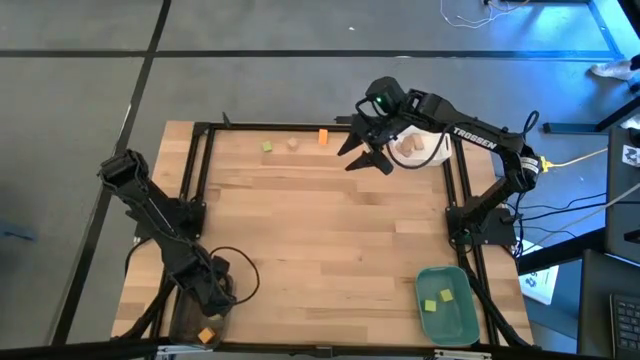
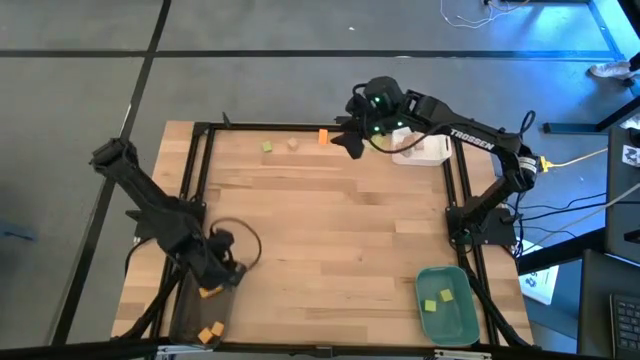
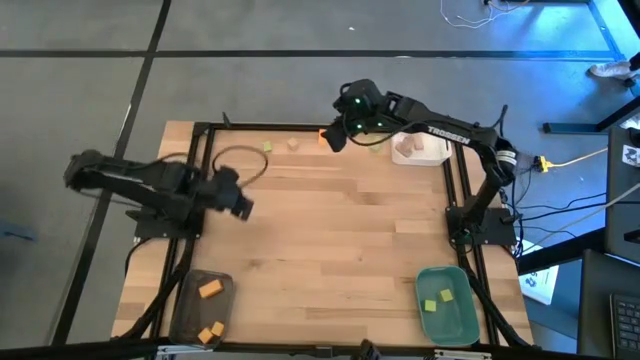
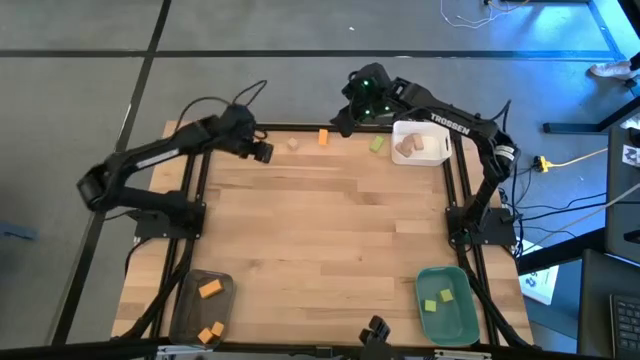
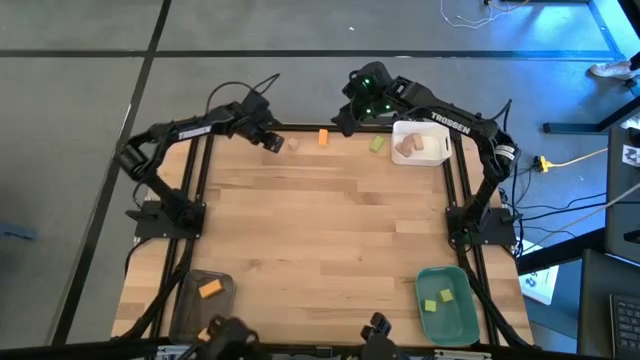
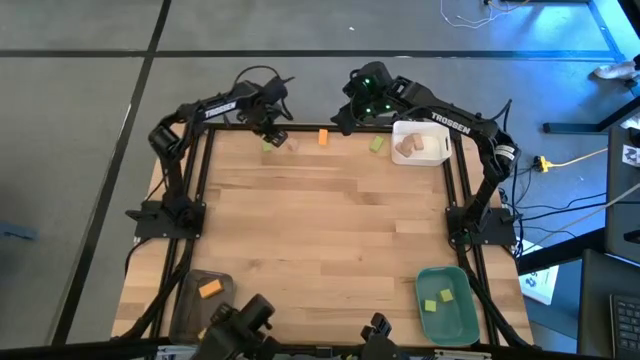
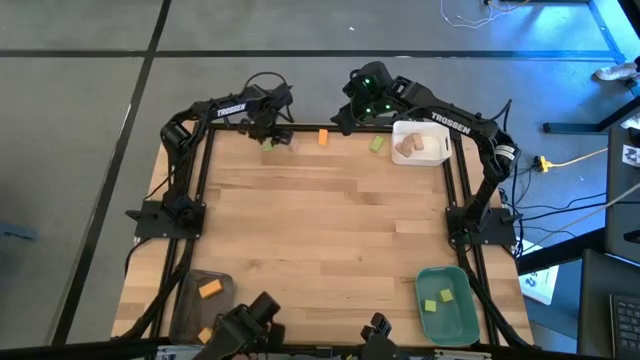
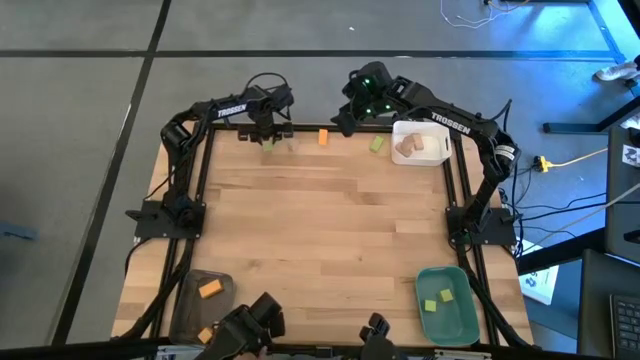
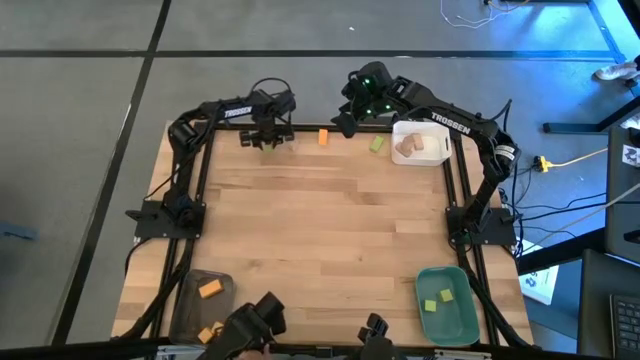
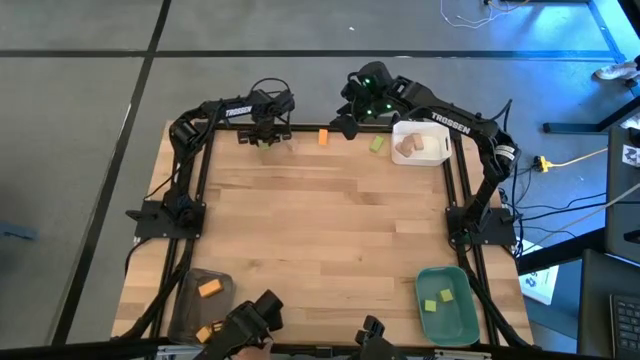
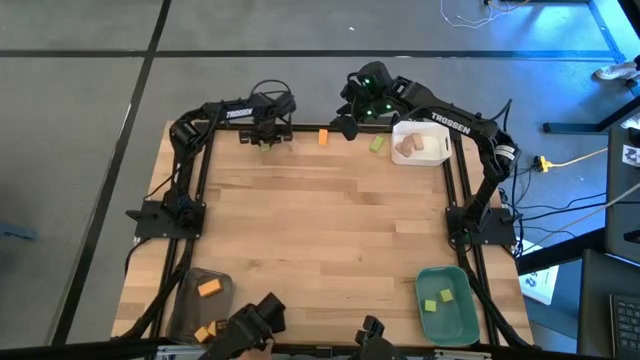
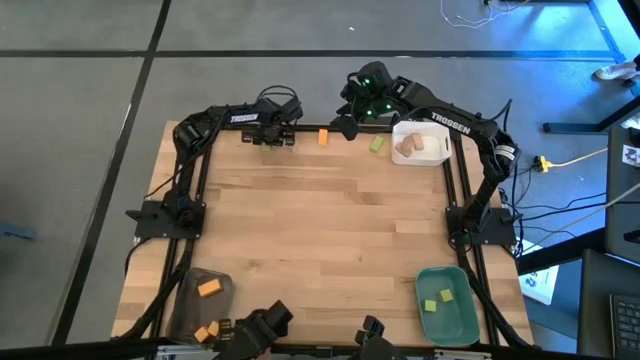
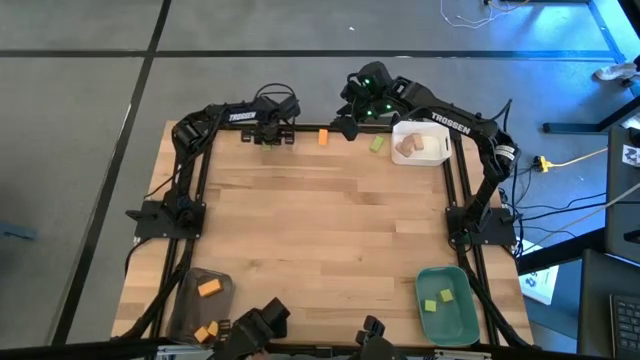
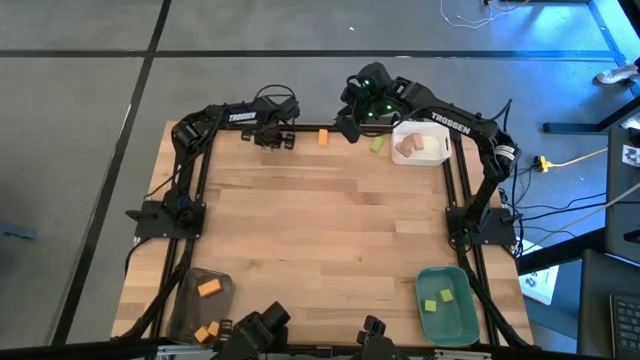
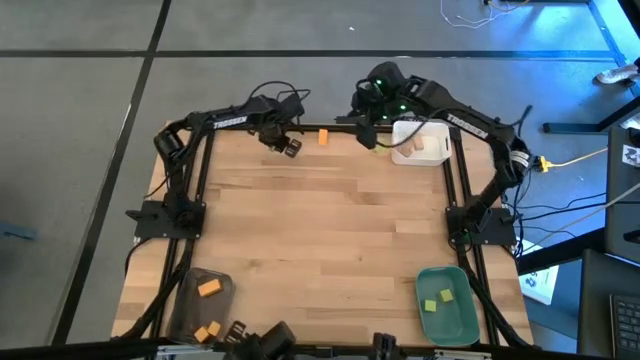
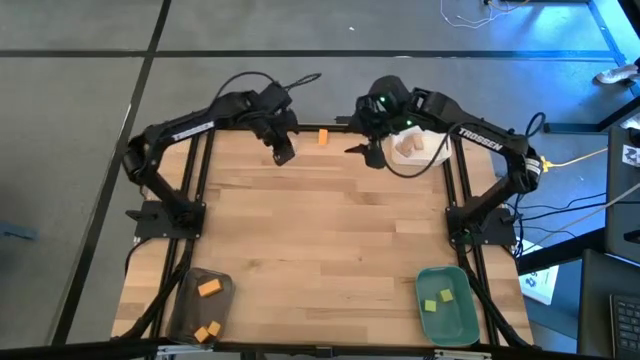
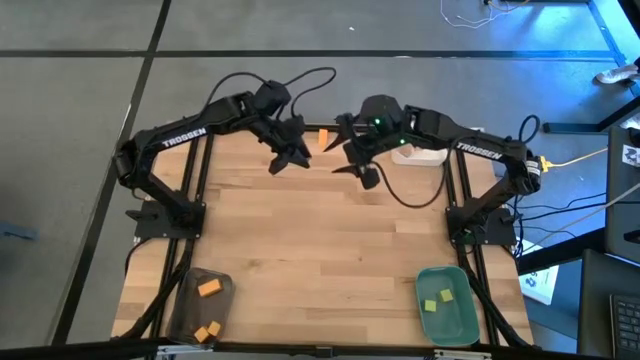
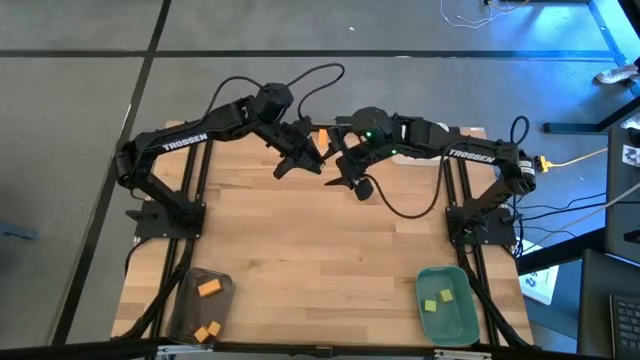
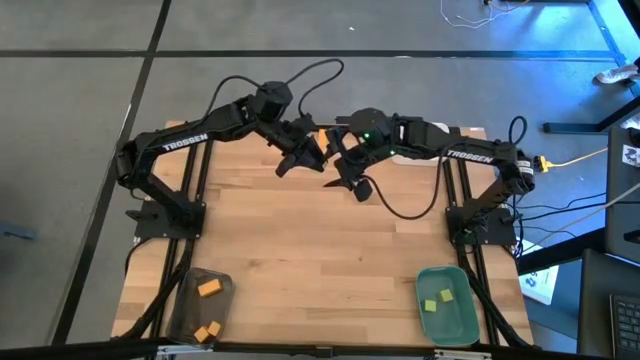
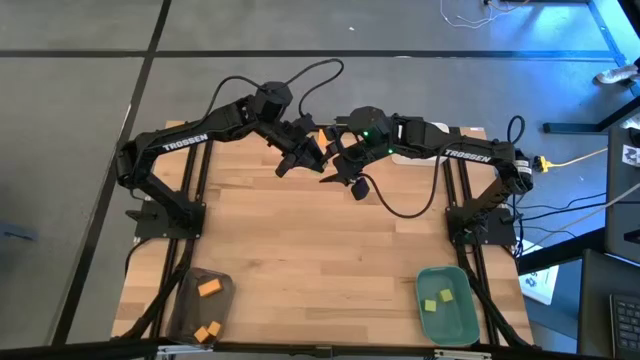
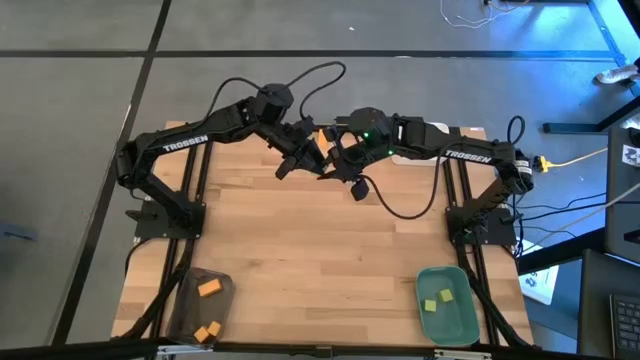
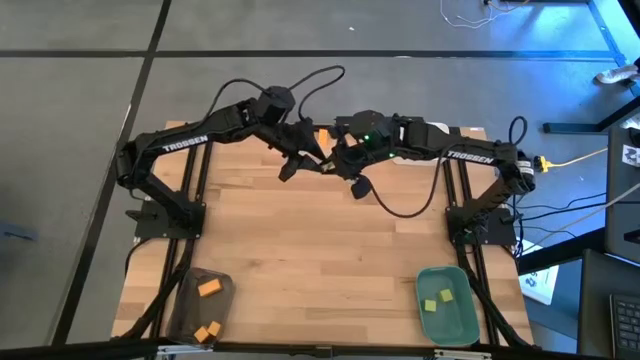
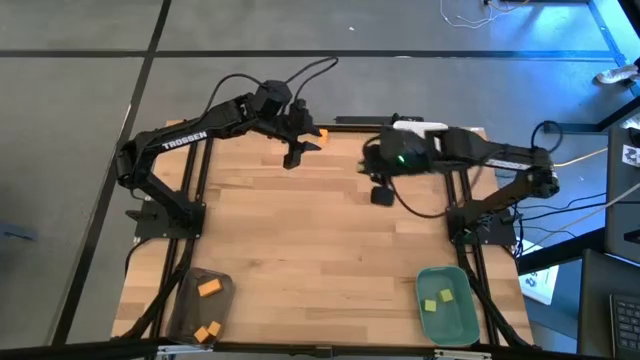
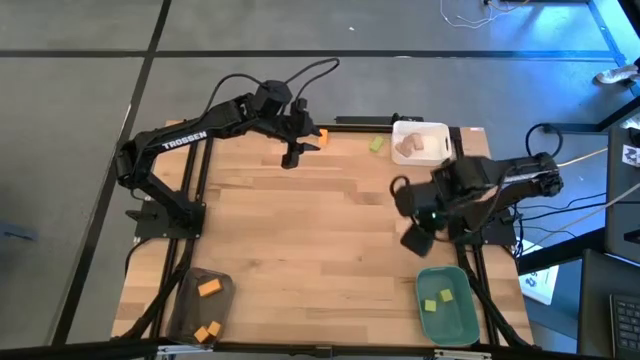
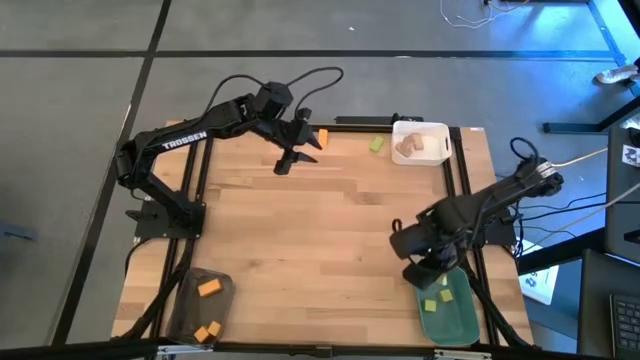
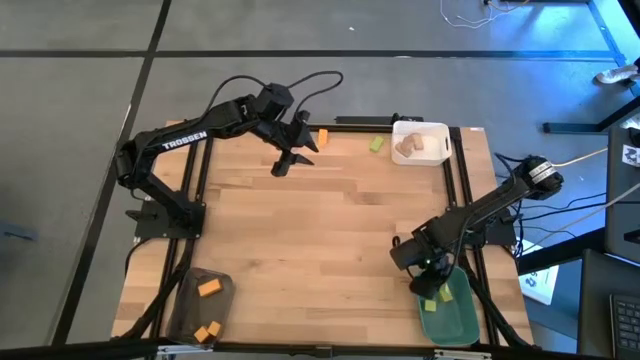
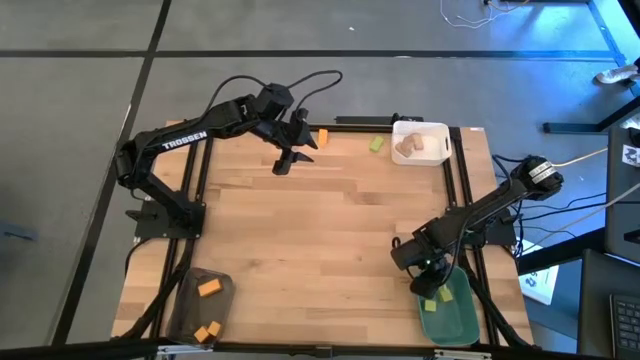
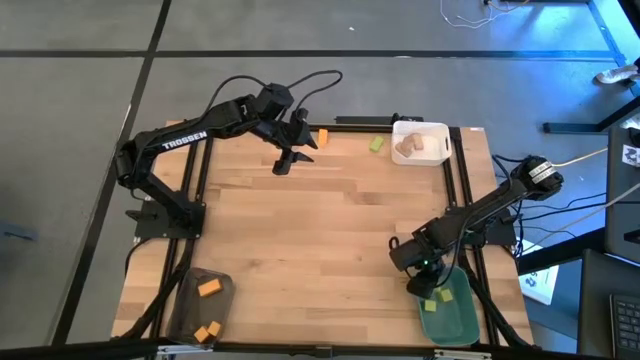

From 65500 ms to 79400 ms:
Task: Sort & place blocks by color
Put the left green block into the blue bin

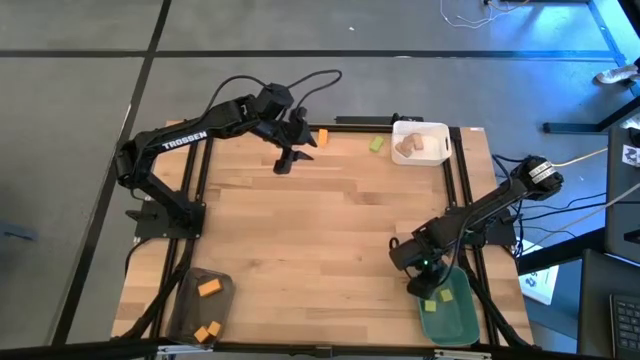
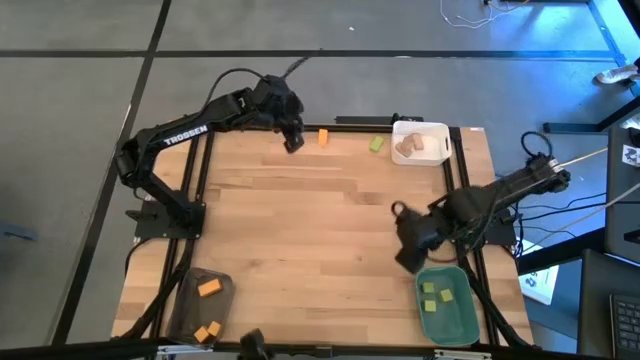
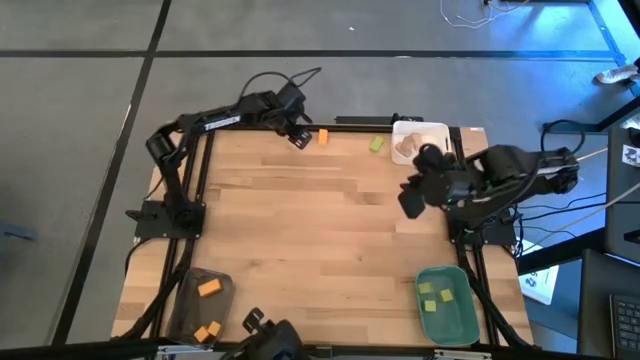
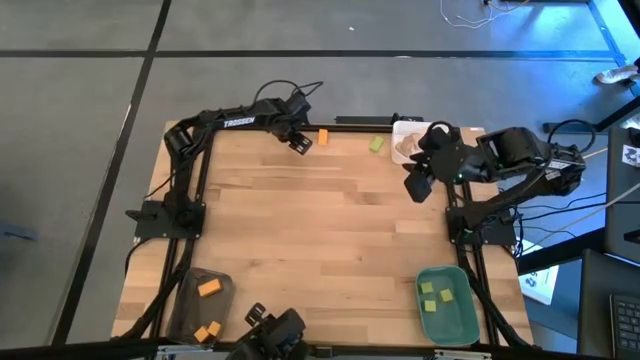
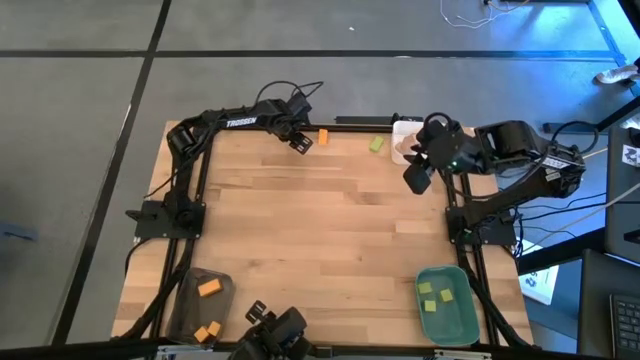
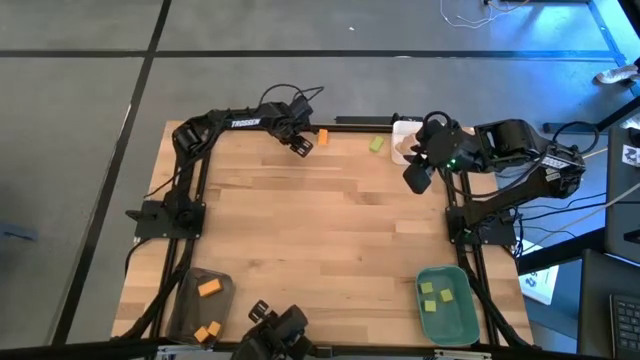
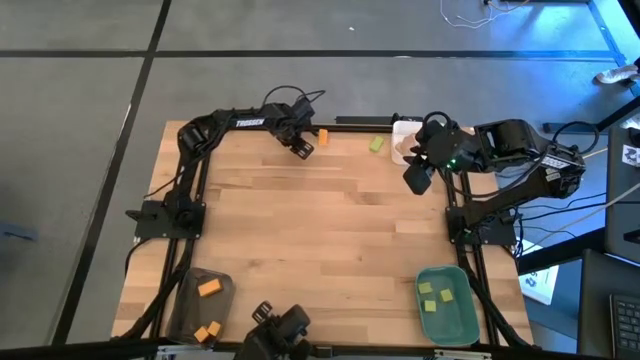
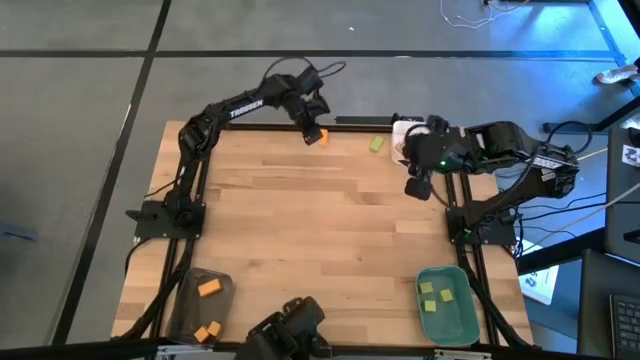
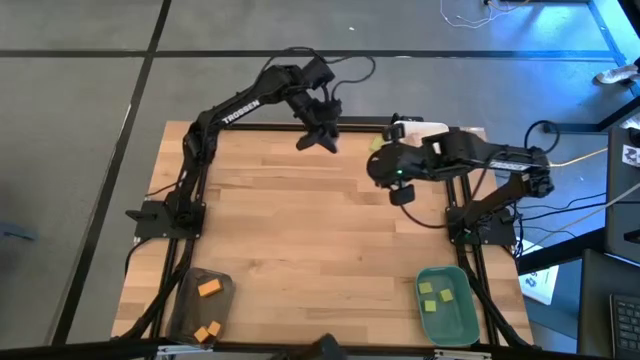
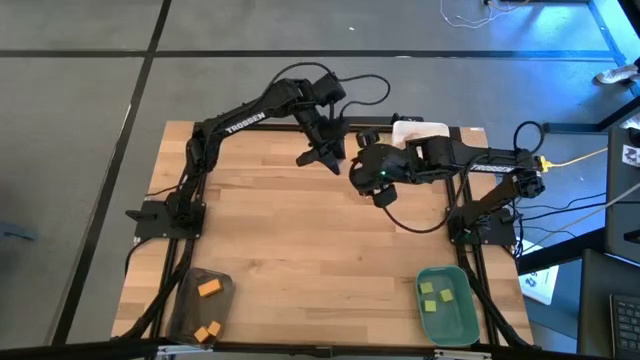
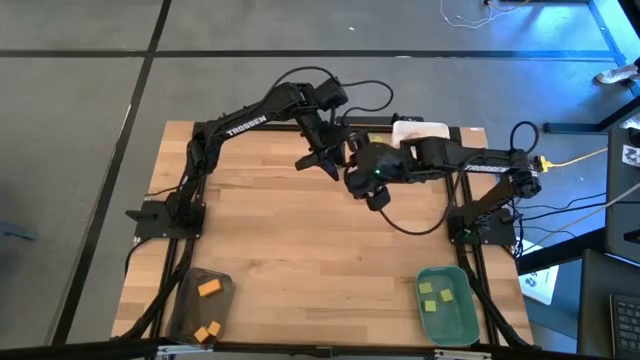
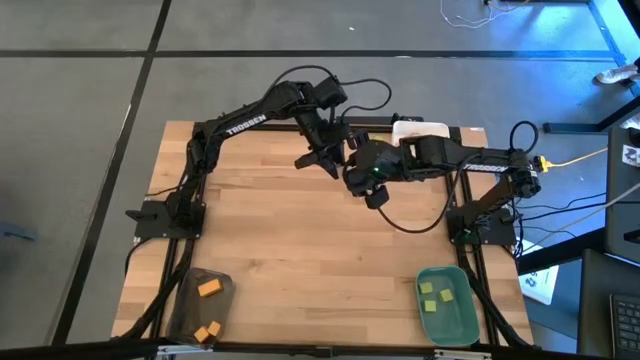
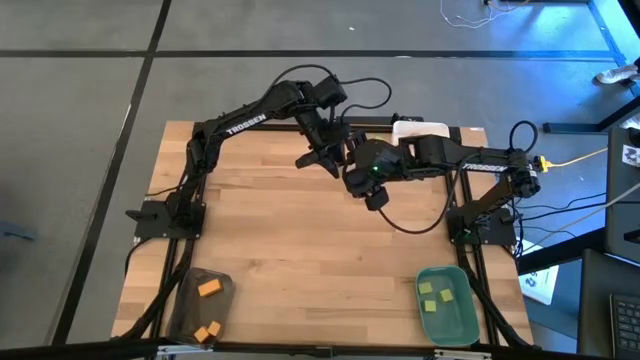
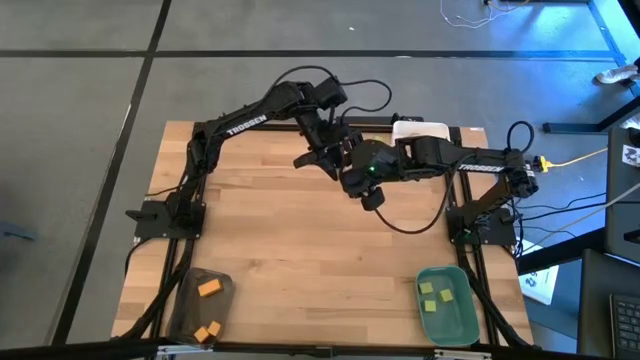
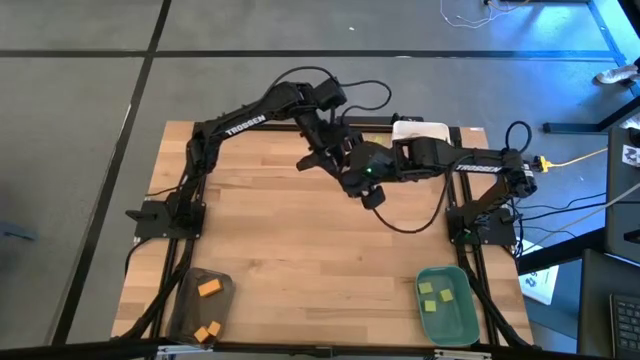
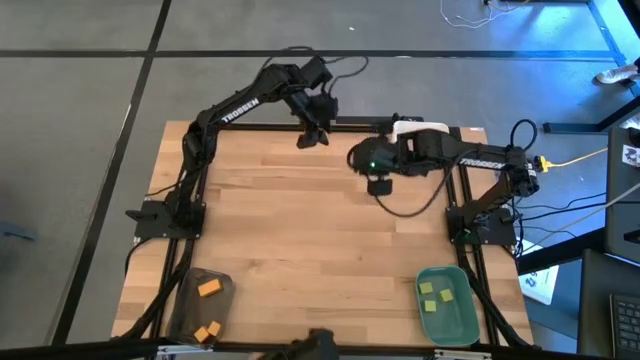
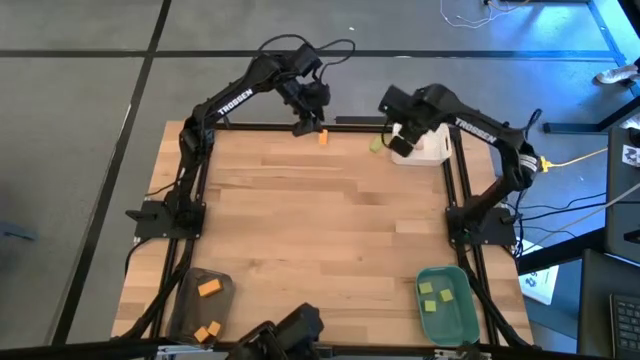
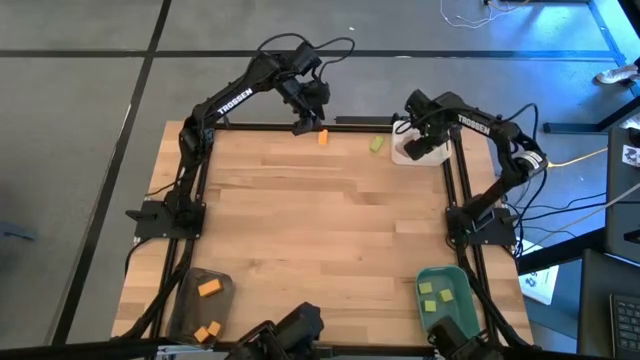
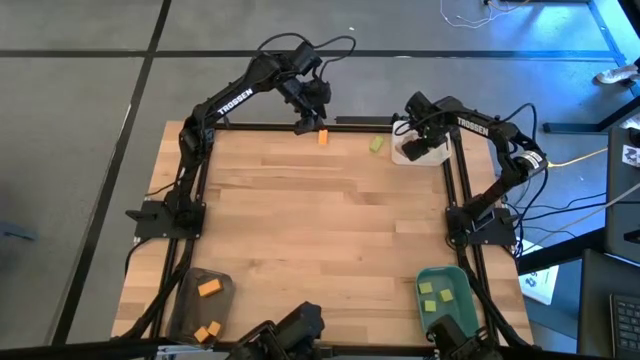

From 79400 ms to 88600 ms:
Put the brown block into the white bin
